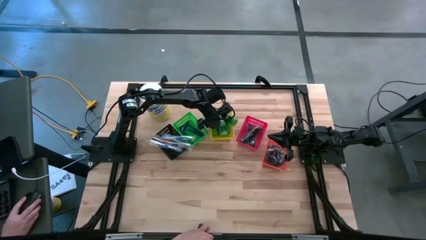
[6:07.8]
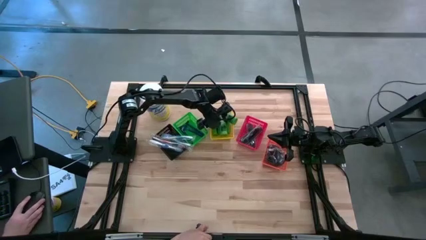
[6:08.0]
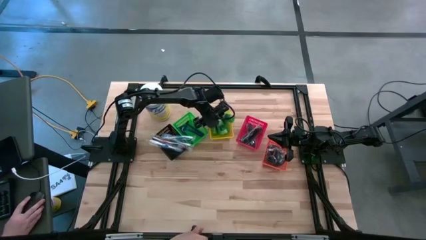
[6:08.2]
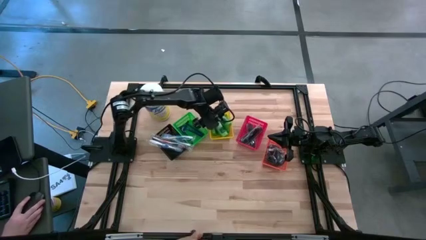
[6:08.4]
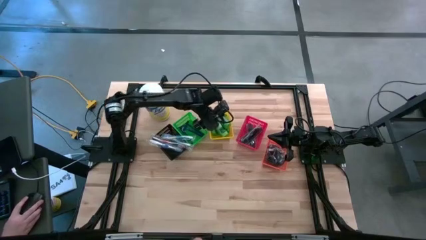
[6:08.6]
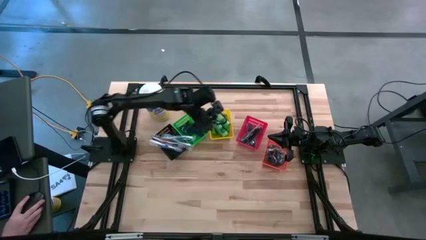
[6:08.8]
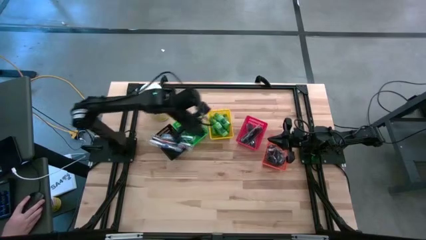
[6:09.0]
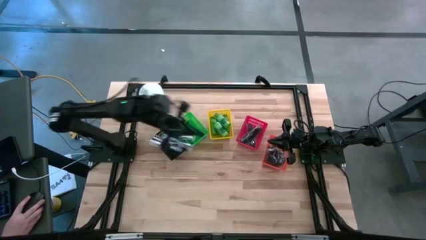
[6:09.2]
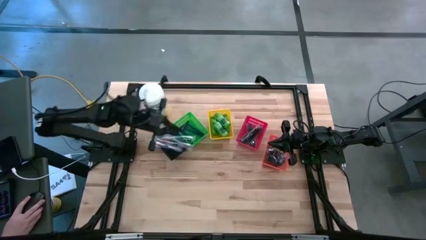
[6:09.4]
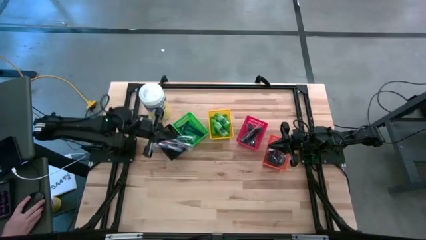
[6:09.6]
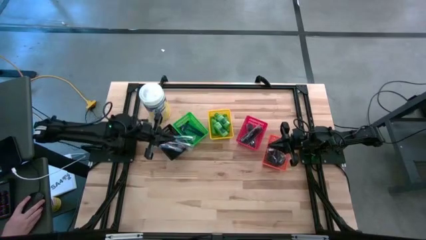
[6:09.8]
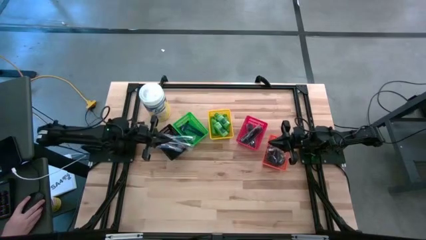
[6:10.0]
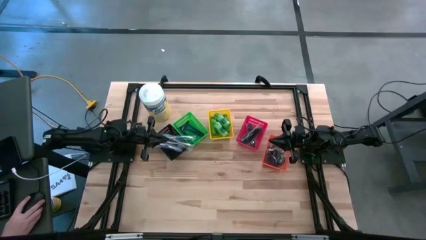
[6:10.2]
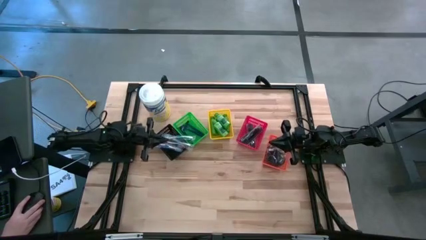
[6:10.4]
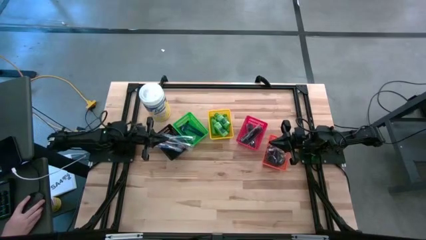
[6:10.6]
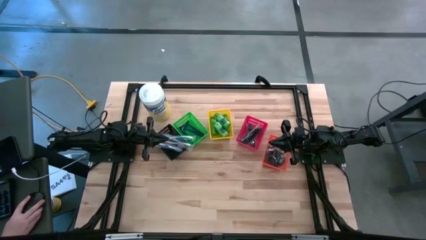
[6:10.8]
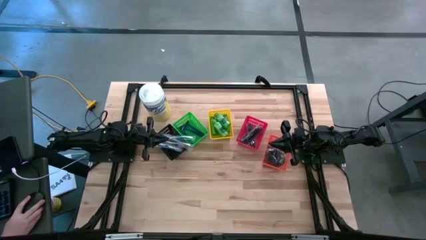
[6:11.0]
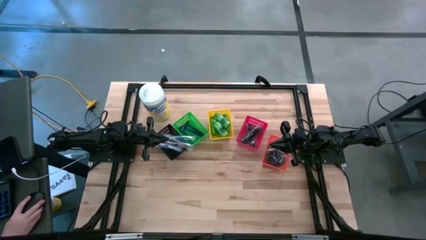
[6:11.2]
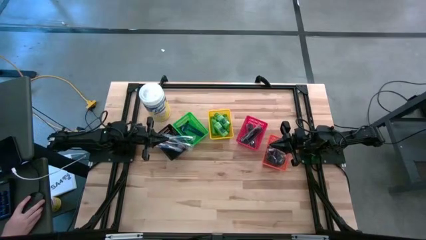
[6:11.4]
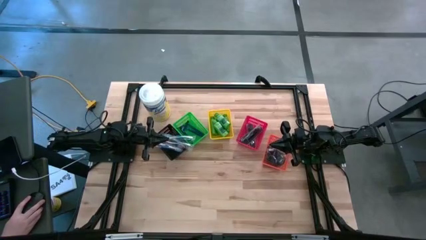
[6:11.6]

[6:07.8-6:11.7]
Task: Pick & Place Travel size toiletries
Return to Home Position

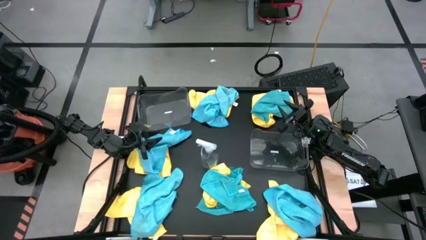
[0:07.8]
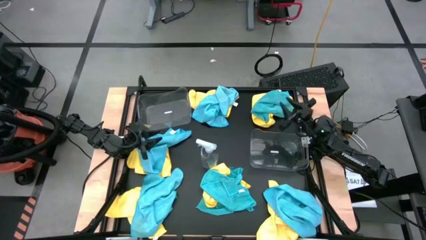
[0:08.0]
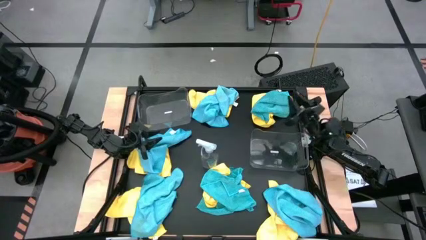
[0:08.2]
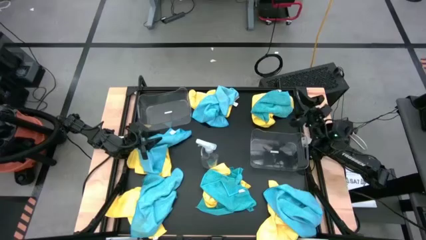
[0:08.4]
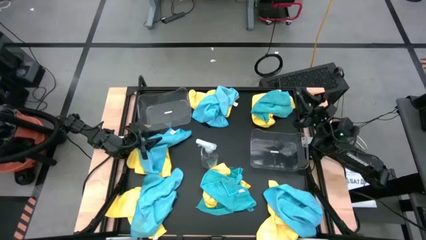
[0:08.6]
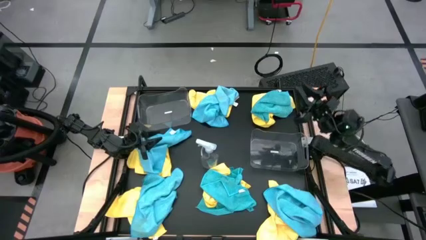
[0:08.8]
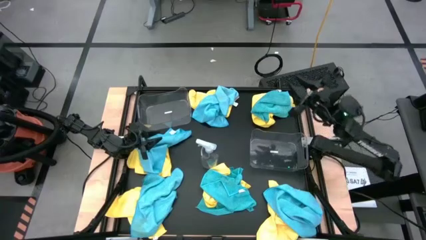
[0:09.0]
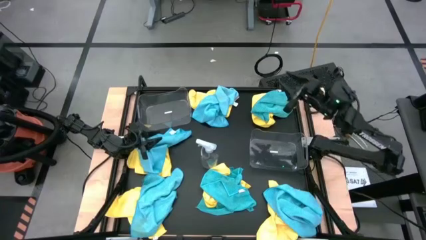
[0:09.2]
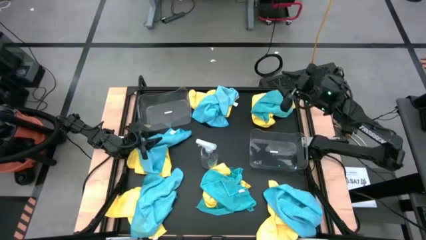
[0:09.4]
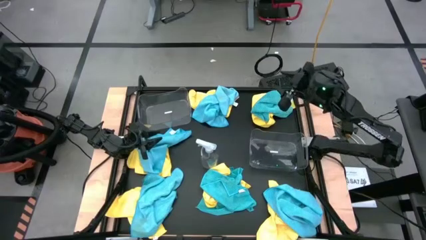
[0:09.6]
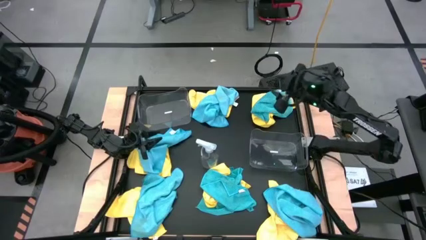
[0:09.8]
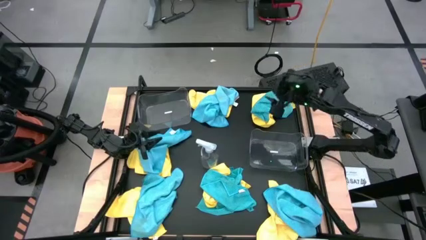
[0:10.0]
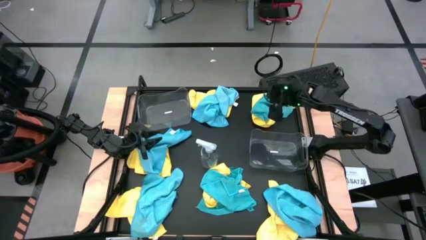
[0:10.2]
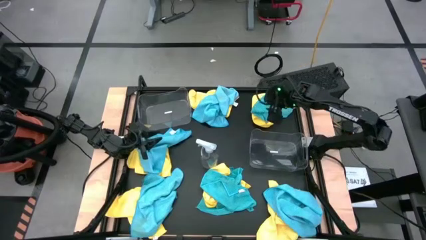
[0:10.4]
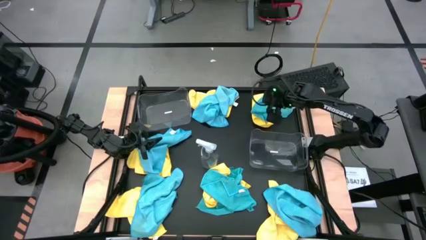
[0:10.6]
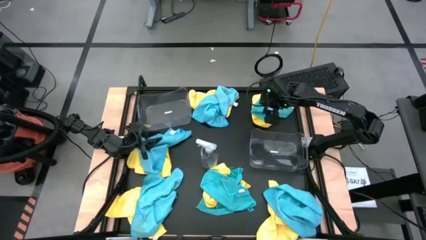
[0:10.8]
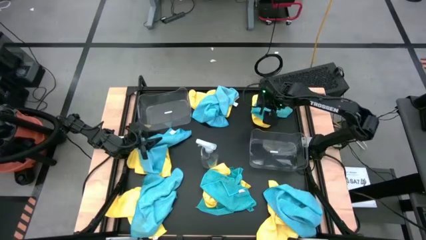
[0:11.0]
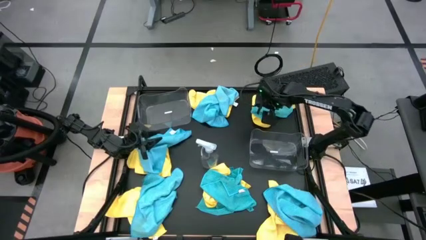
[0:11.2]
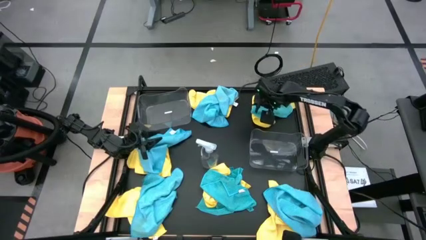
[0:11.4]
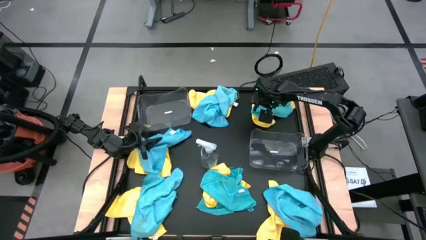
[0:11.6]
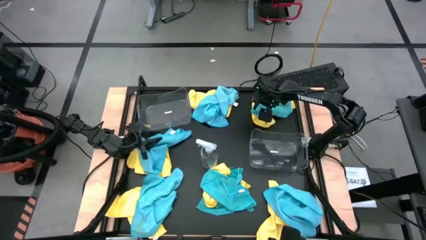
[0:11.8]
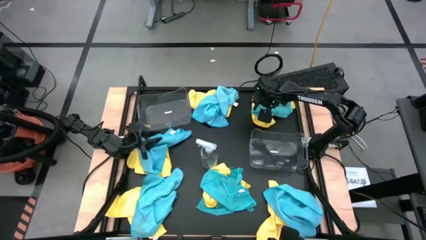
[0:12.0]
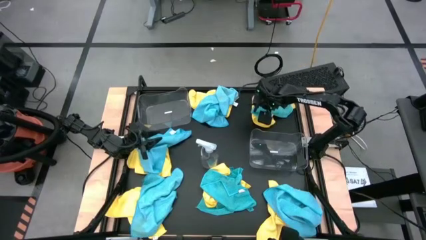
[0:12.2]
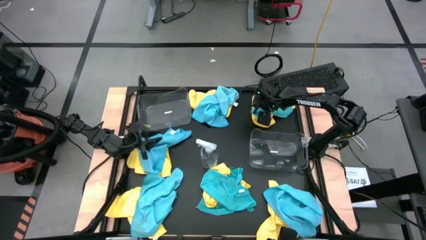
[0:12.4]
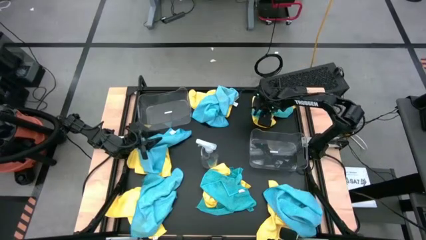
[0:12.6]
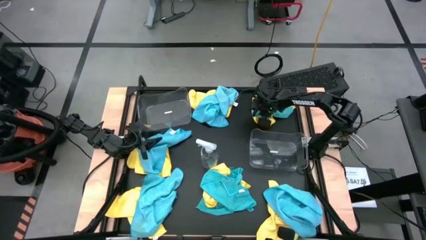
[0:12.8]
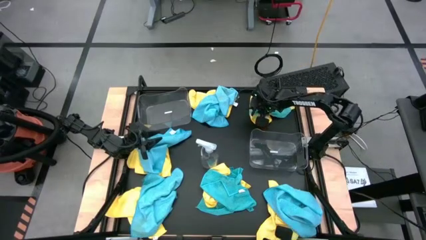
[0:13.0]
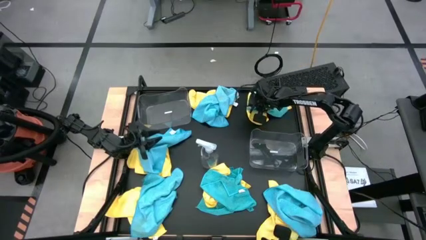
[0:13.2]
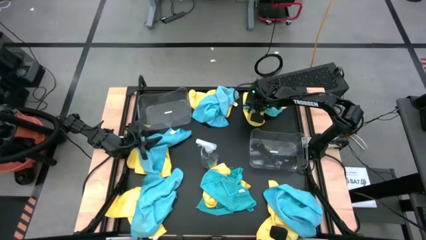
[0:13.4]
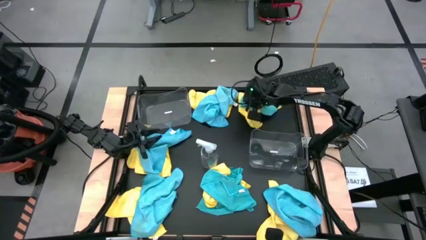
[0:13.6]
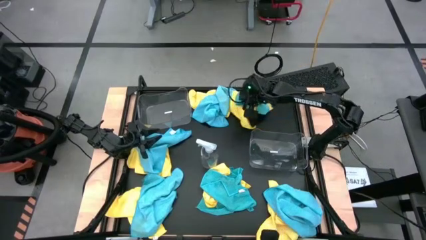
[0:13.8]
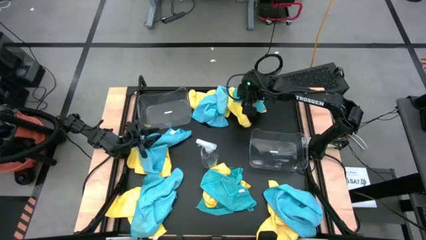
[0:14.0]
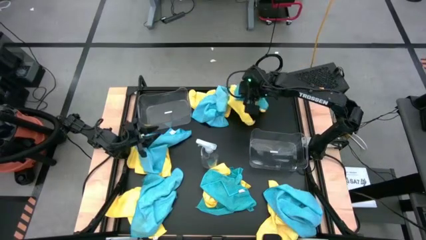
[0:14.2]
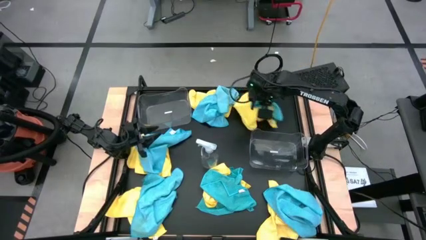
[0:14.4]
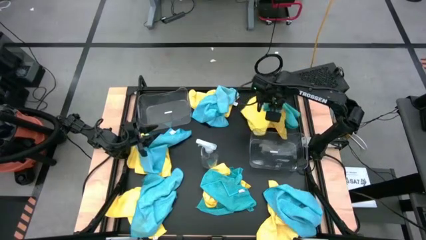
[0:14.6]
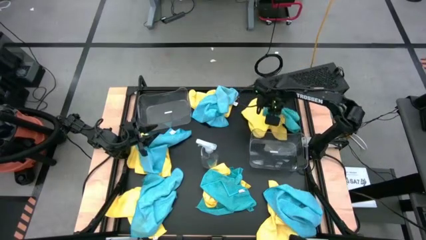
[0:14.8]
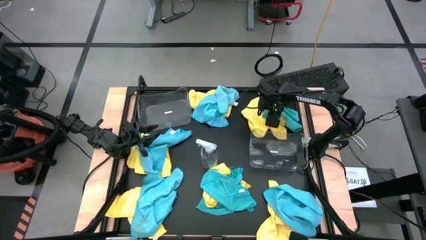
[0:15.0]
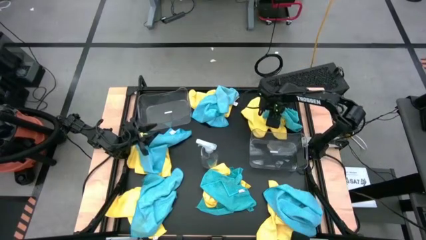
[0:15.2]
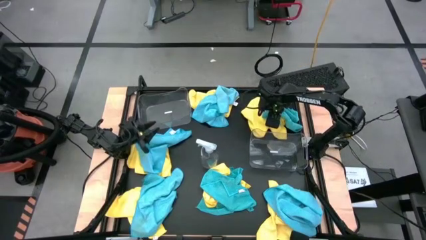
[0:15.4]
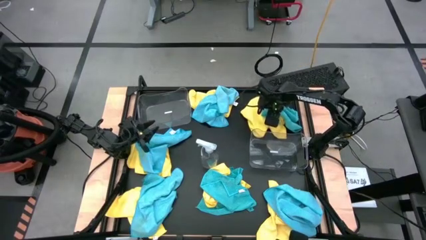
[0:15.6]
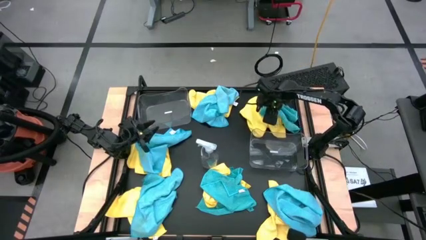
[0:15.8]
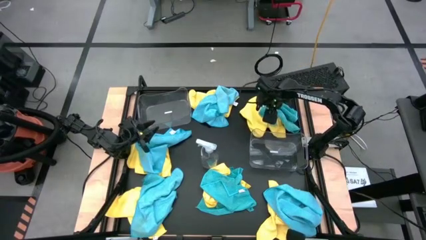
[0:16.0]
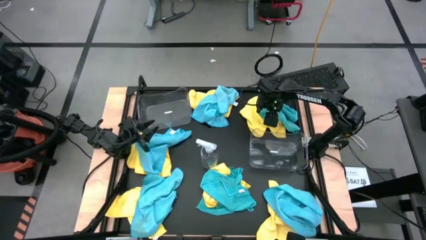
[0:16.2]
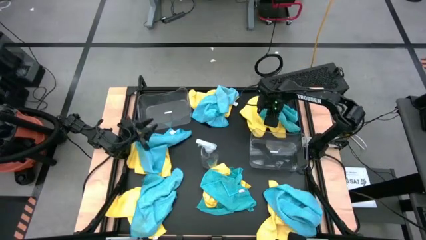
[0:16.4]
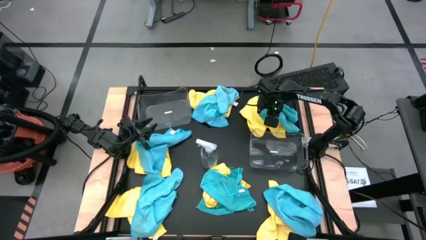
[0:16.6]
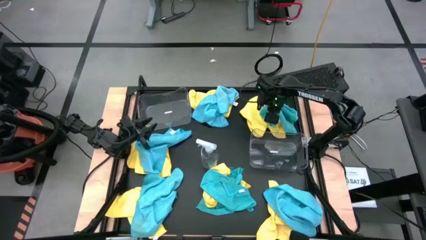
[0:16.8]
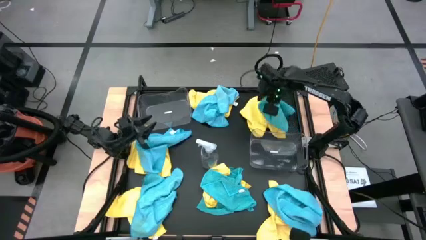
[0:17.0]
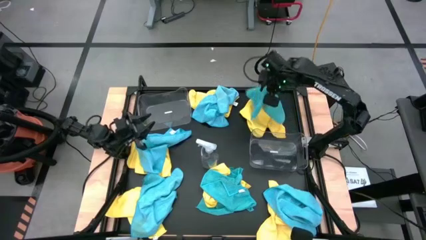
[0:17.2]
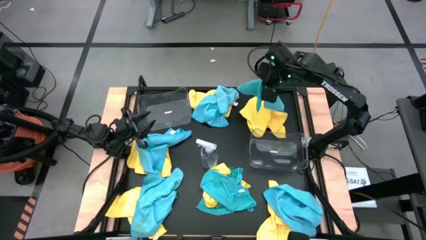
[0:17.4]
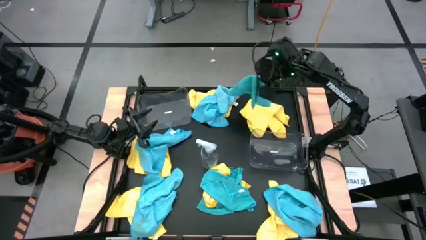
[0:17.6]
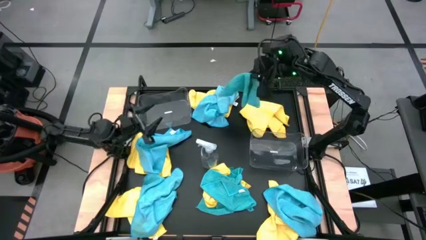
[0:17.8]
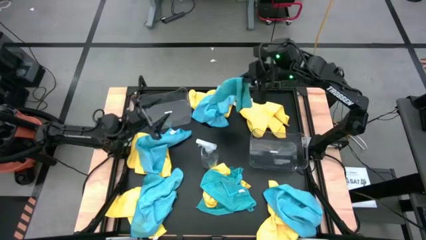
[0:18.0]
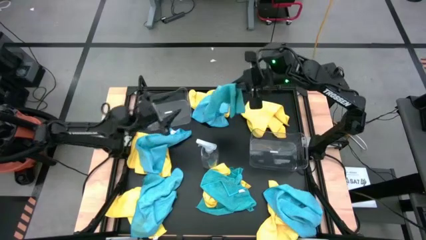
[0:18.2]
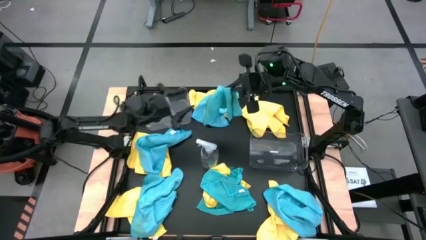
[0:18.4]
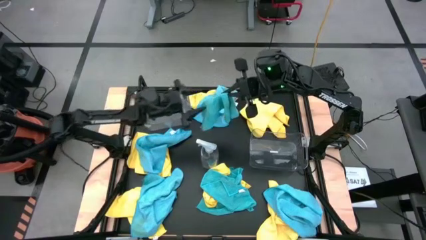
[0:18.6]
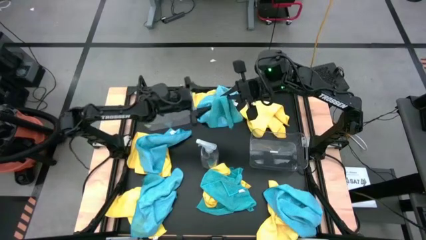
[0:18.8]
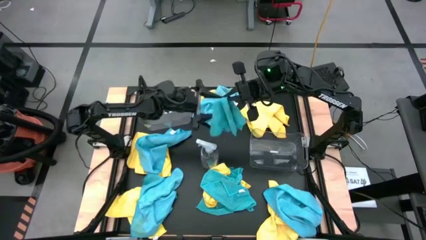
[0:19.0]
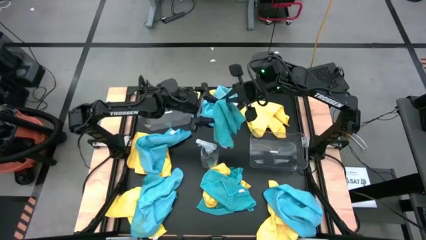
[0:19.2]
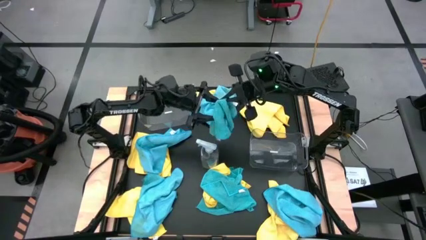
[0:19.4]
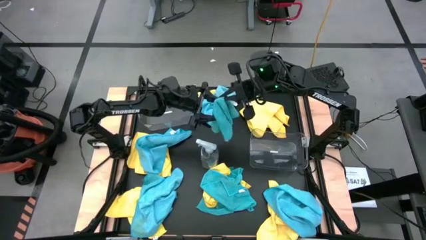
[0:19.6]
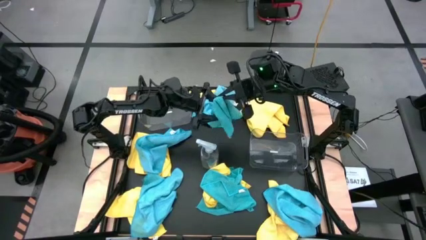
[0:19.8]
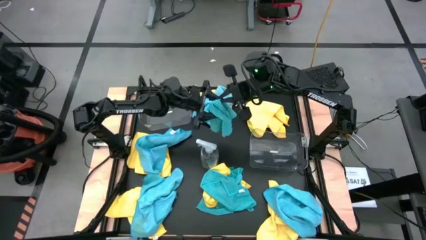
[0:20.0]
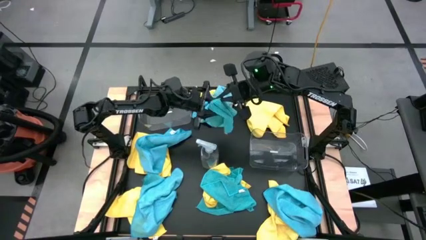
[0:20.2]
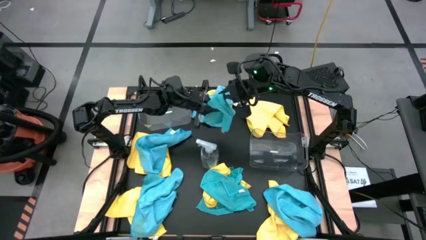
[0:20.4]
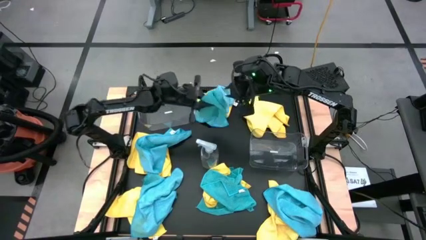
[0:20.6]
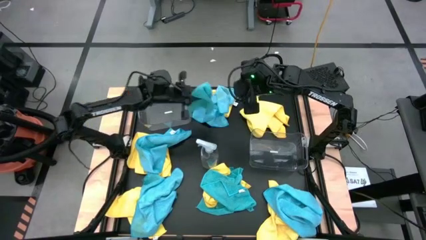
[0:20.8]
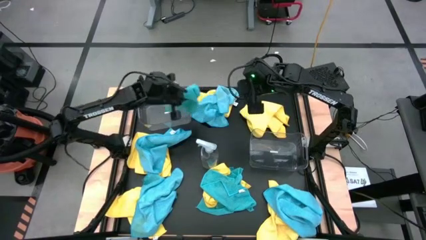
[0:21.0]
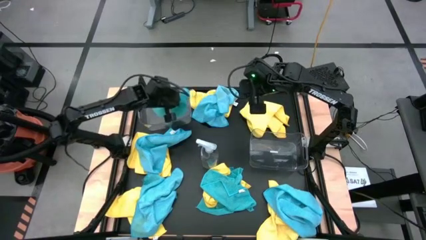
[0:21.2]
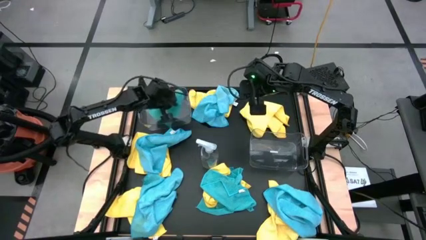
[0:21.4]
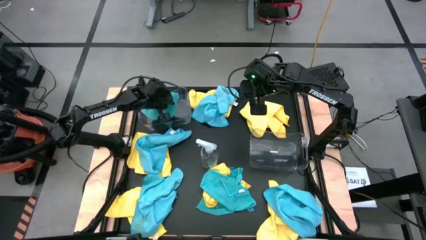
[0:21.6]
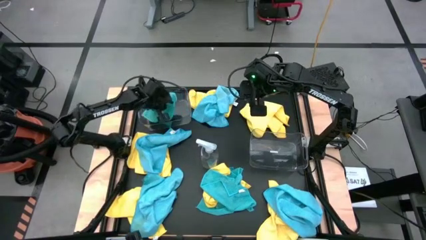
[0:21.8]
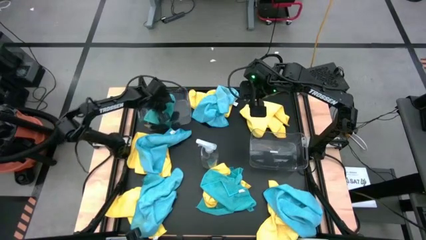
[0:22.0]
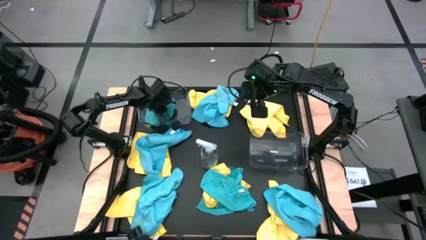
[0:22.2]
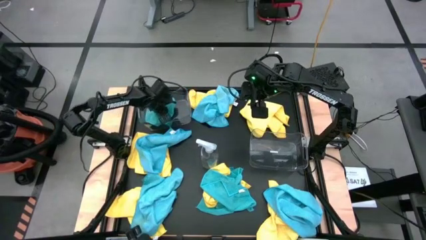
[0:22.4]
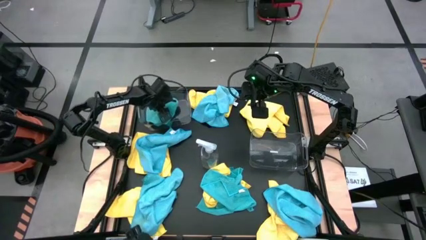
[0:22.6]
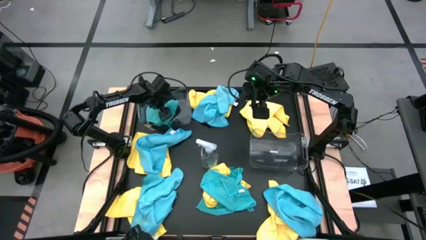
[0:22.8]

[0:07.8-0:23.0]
Task: Sort microfiber towel by color & place in baskets
Put the blue microfiber towel into the top transparent bin
